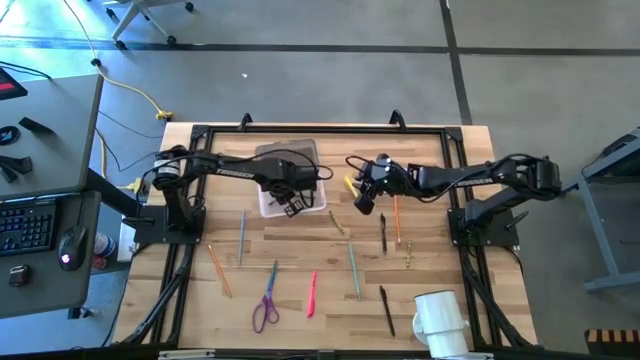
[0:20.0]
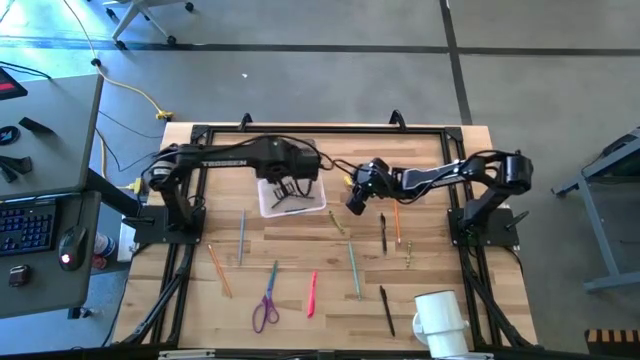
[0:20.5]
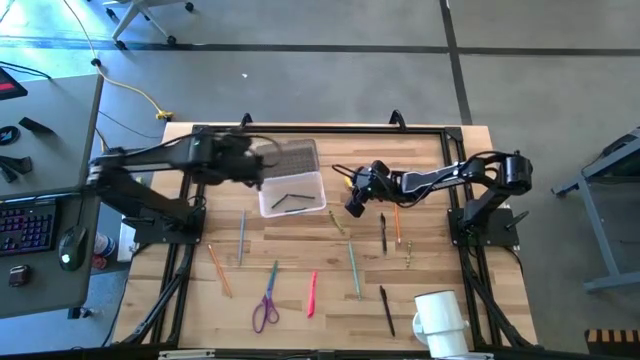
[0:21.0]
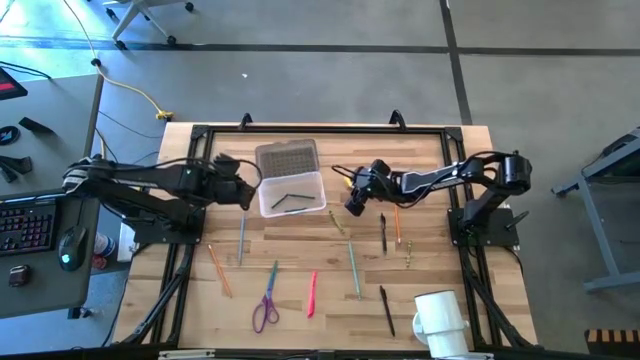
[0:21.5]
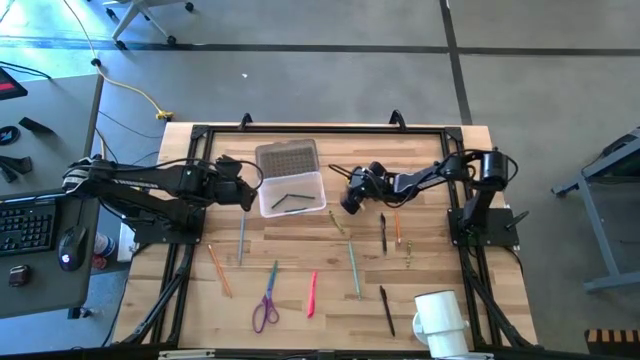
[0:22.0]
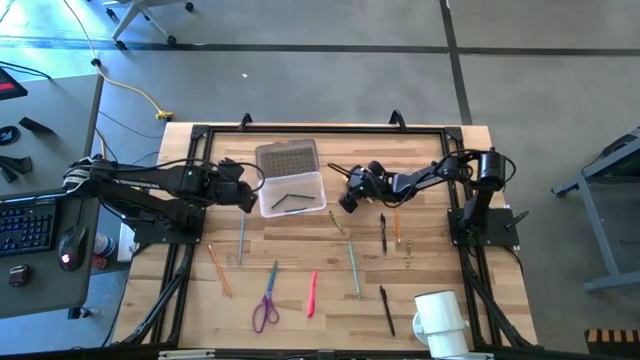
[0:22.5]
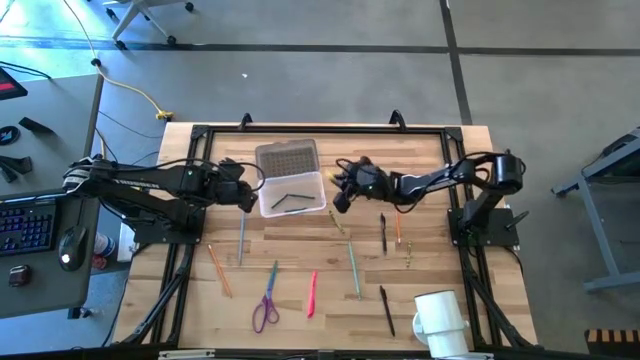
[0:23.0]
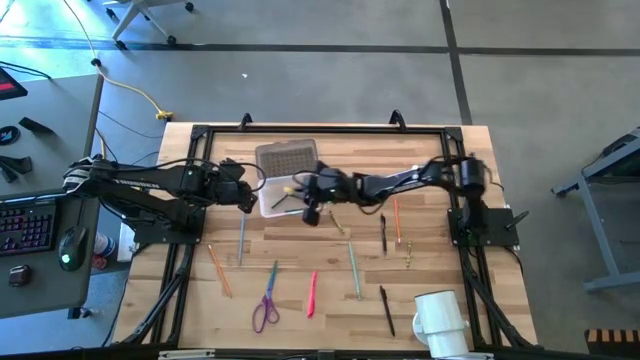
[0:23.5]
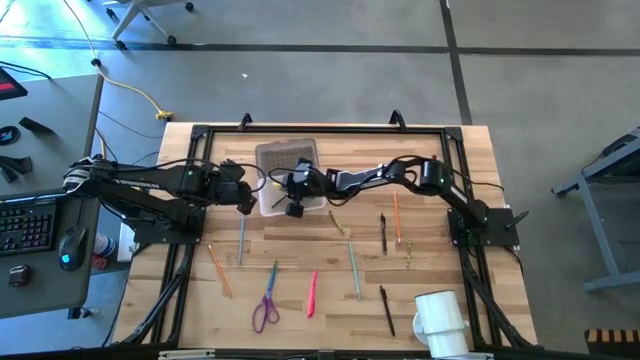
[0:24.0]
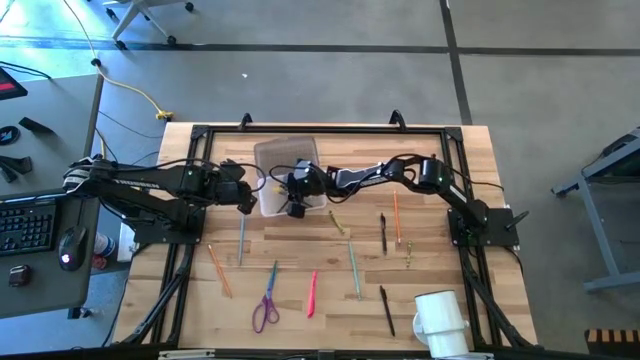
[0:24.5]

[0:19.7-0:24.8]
Task: Pick & place school supplies into a supply box
Put the yellow pen into the transparent supply box

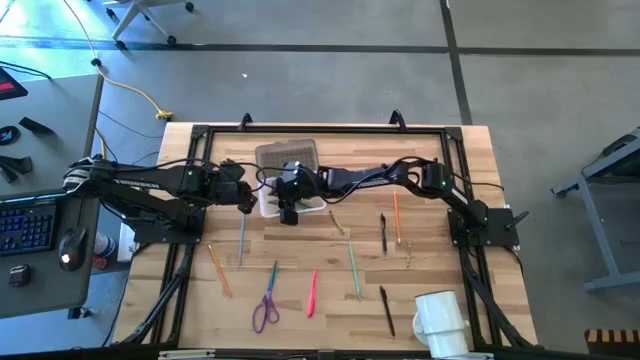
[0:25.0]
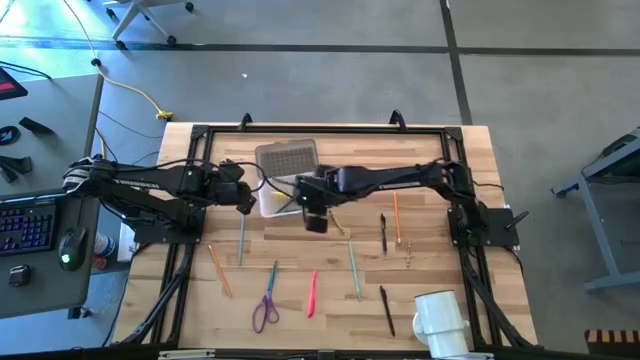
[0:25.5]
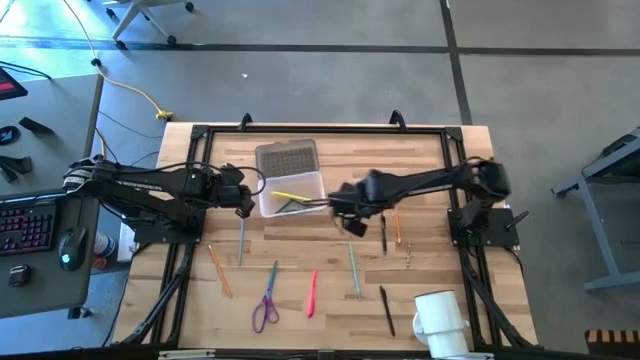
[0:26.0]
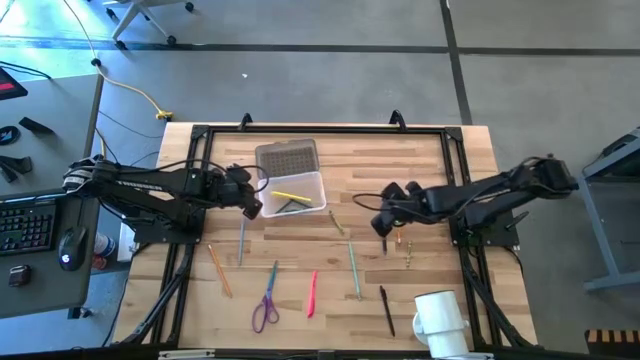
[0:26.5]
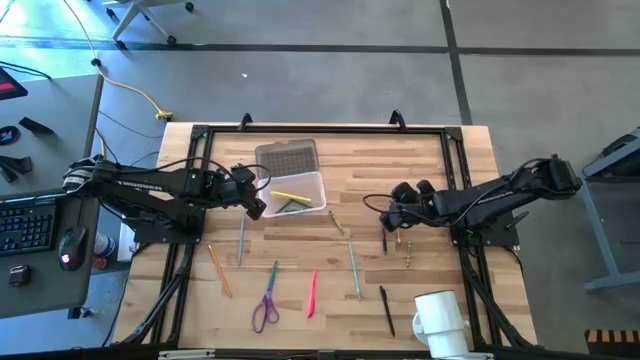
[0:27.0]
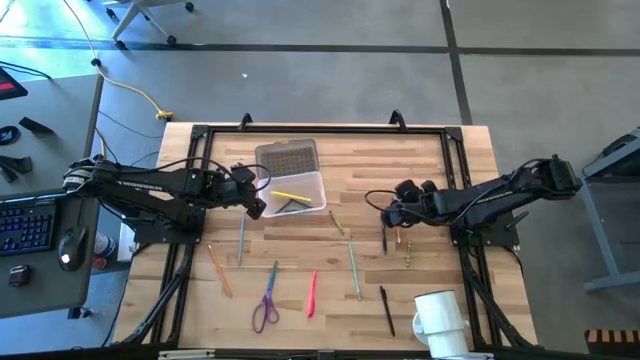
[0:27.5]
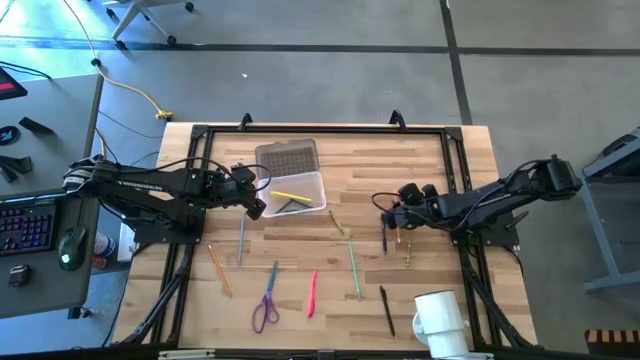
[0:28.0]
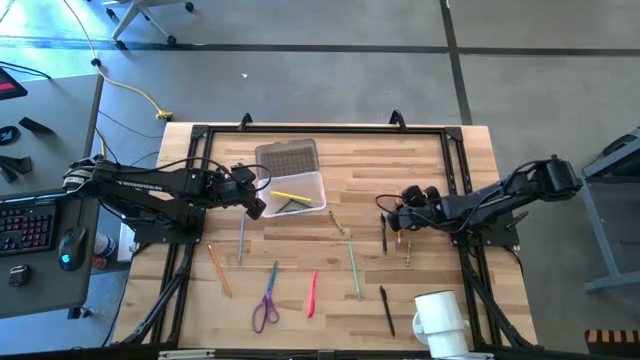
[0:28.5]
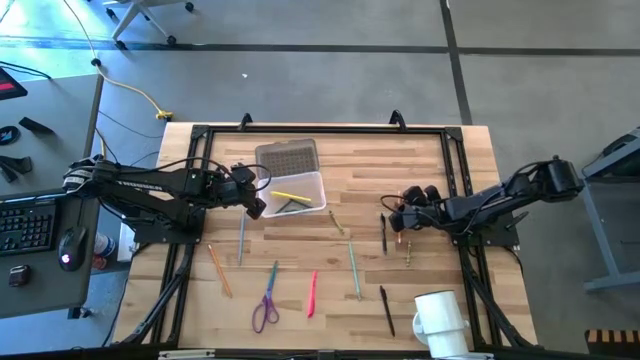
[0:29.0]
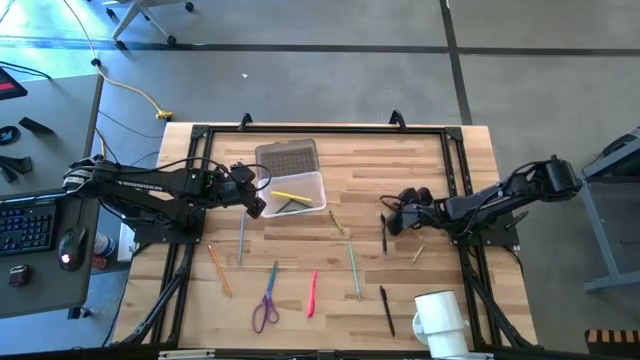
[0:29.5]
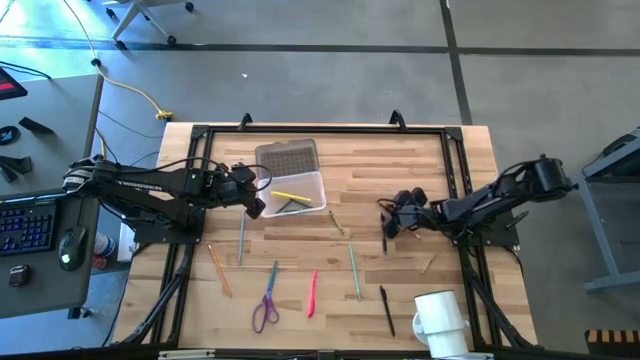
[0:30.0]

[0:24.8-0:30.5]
Put the right orange pencil into the transparent supply box

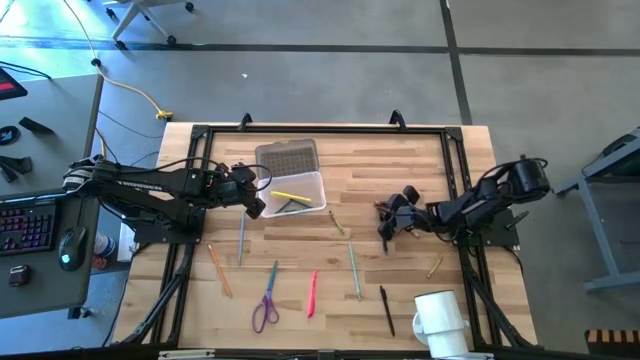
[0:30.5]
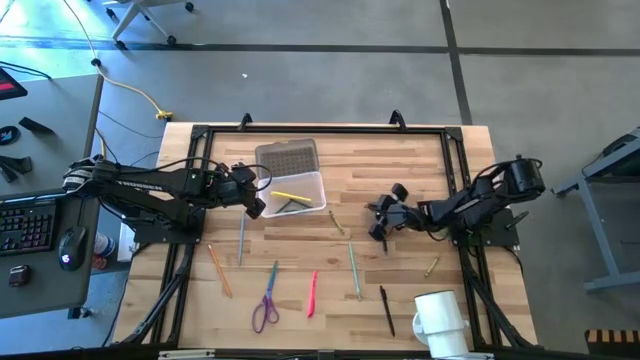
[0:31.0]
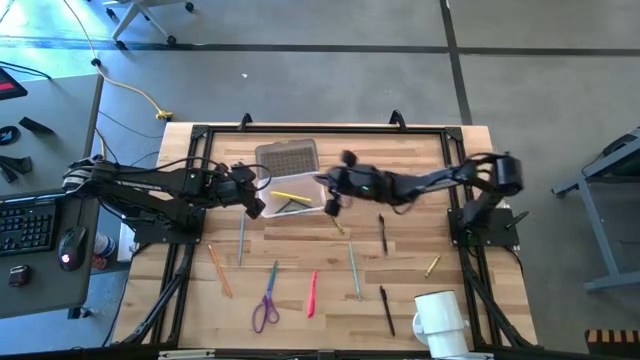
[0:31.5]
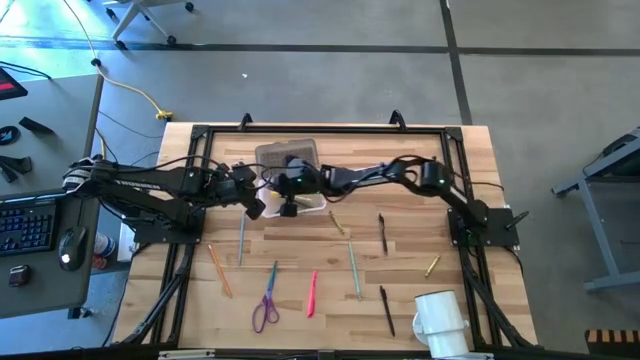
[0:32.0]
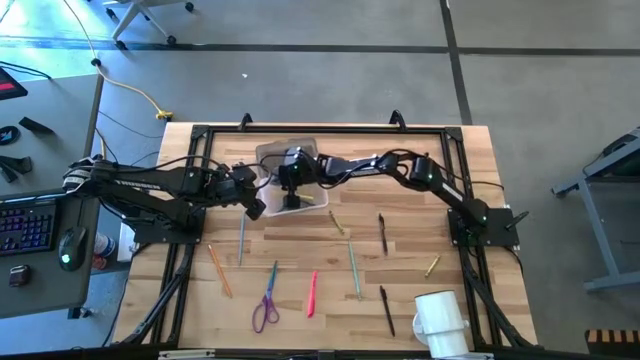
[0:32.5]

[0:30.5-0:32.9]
Put the right orange pencil into the transparent supply box

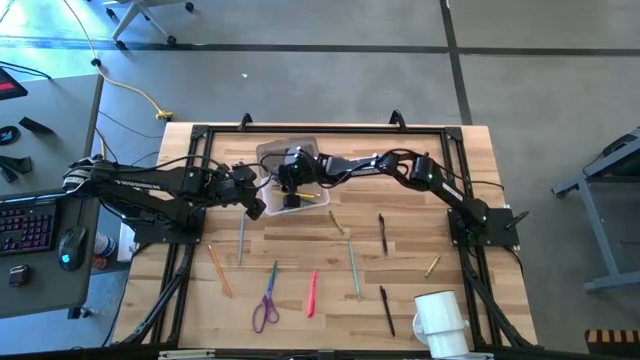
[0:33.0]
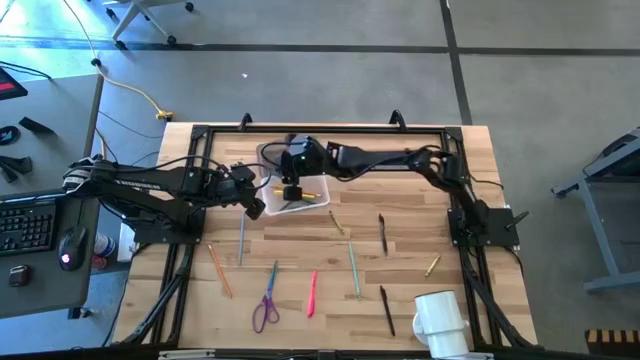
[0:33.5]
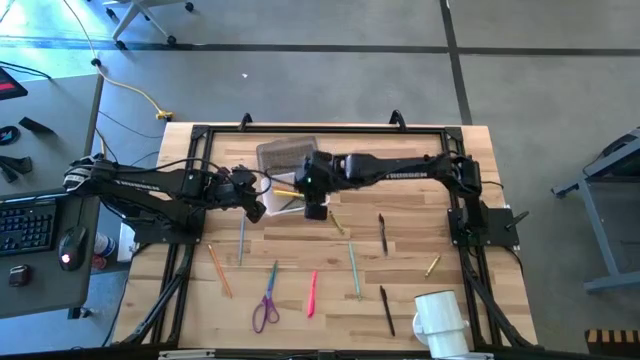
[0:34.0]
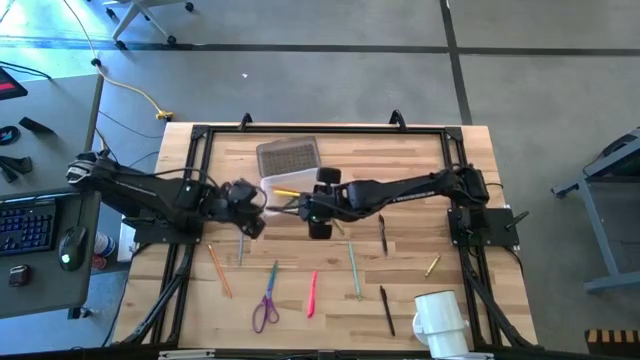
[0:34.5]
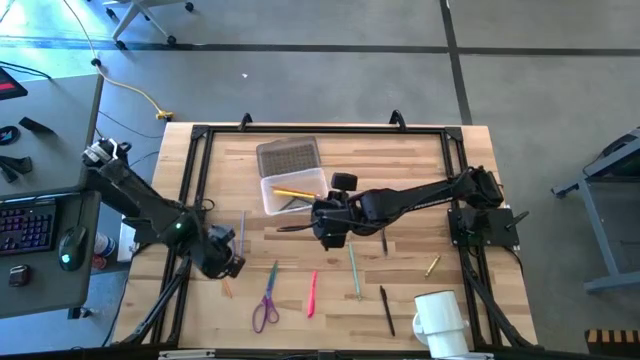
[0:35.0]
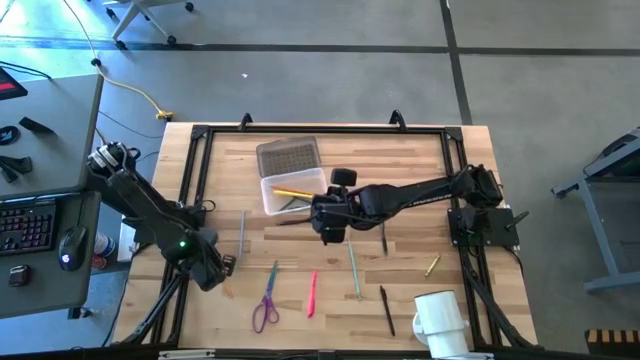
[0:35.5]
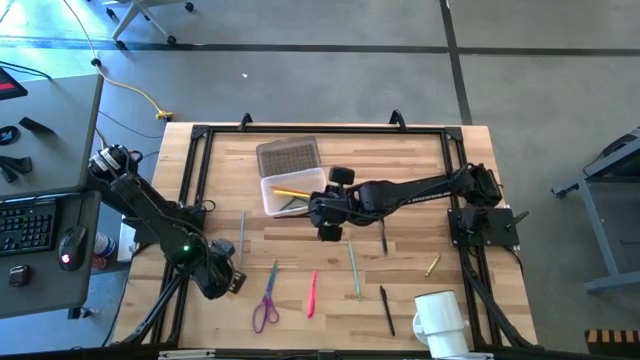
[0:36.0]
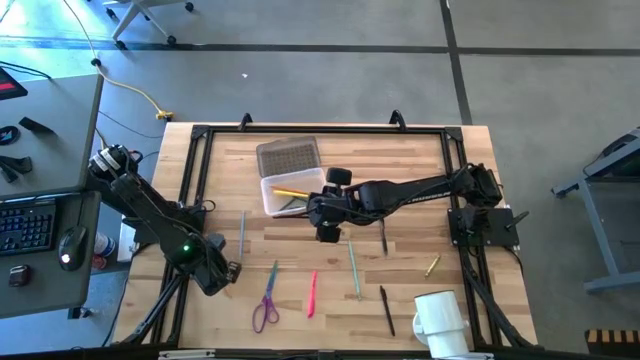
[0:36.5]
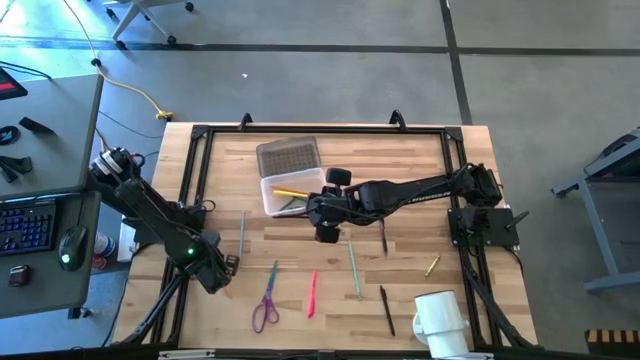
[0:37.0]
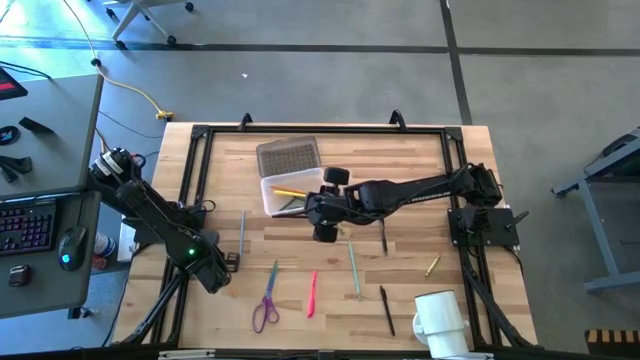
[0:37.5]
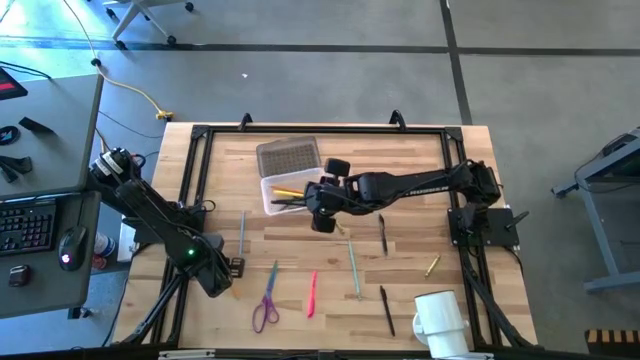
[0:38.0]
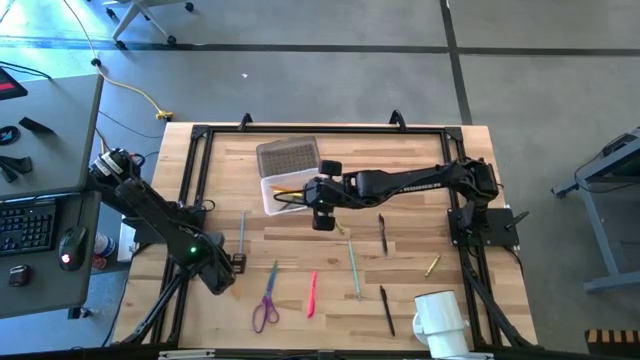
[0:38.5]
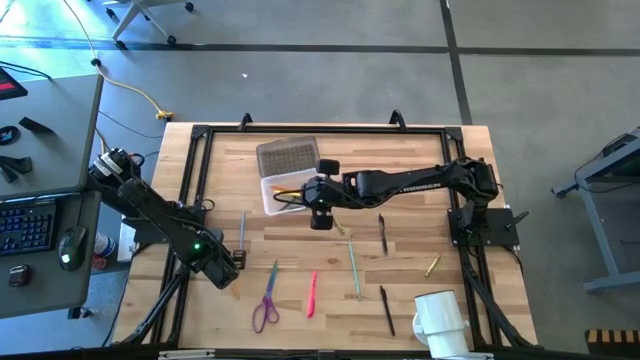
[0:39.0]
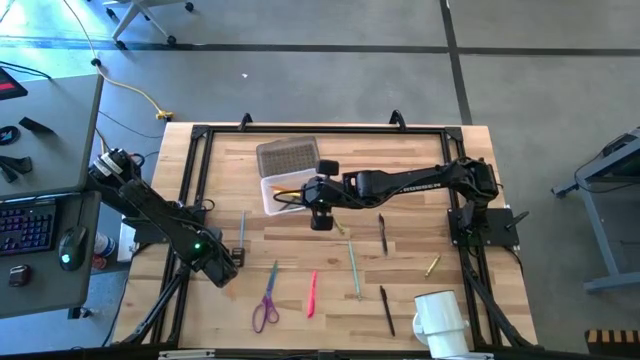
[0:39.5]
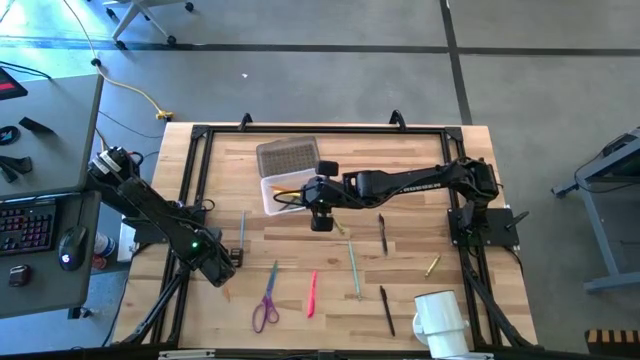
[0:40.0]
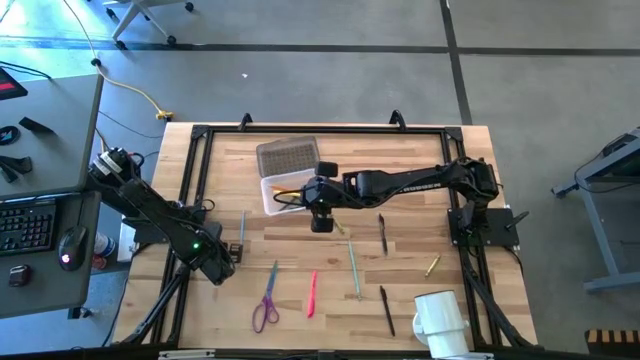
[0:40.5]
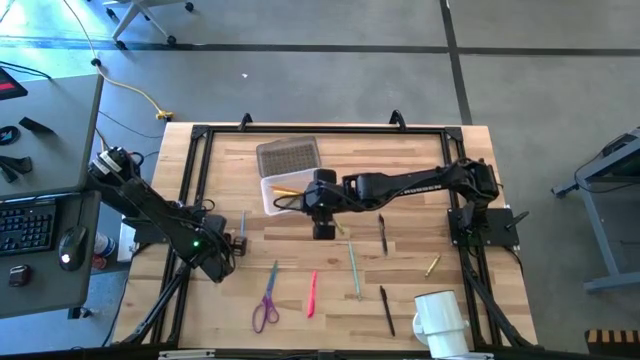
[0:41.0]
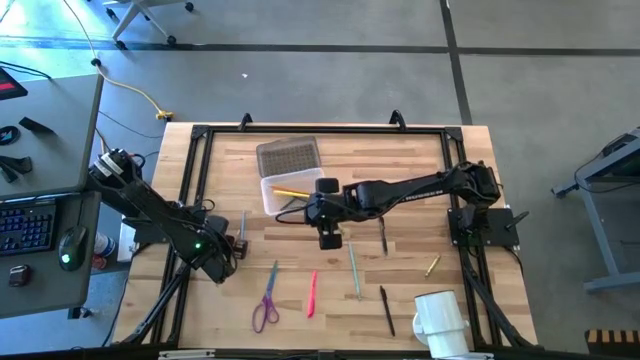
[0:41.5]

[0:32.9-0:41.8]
Put the orange pencil into the transparent supply box
